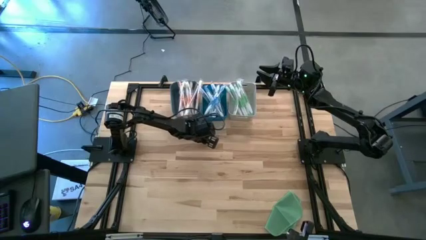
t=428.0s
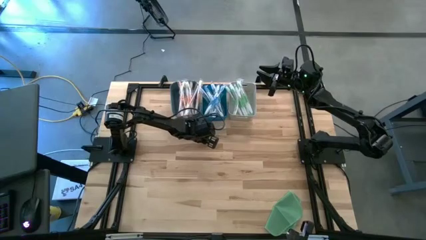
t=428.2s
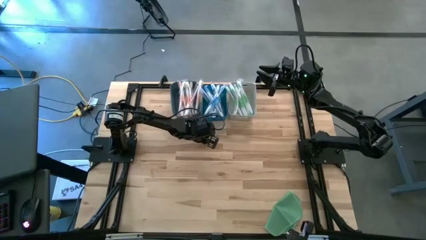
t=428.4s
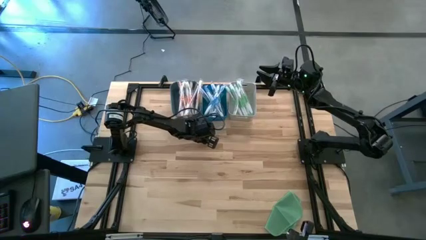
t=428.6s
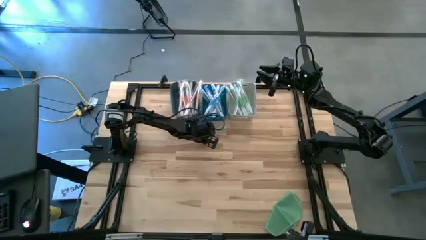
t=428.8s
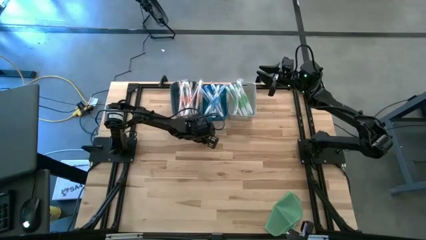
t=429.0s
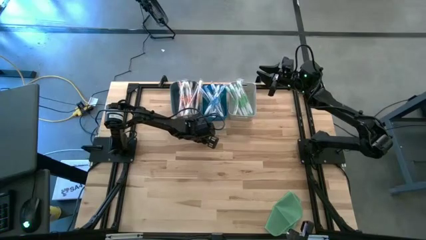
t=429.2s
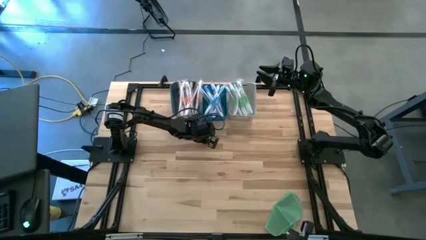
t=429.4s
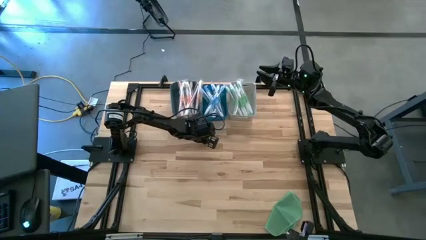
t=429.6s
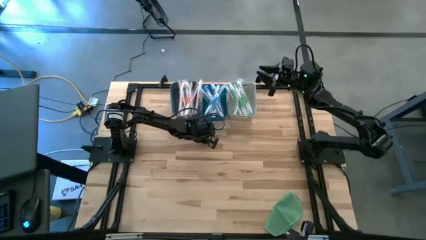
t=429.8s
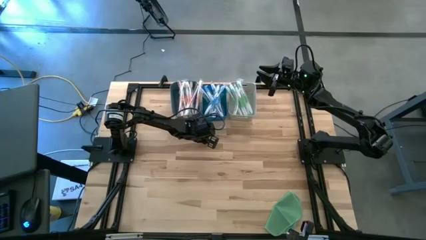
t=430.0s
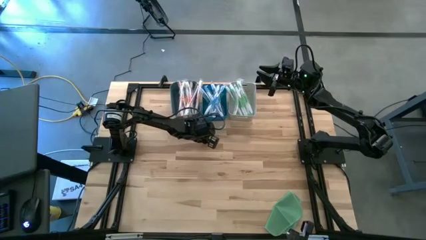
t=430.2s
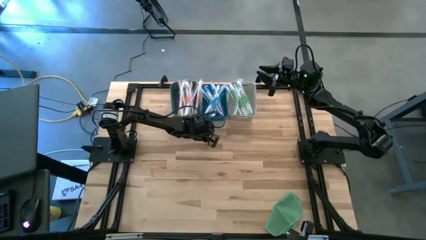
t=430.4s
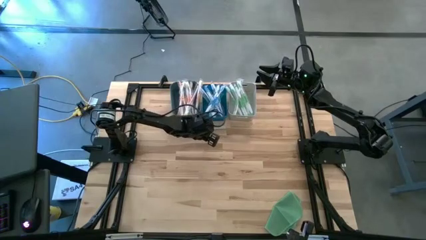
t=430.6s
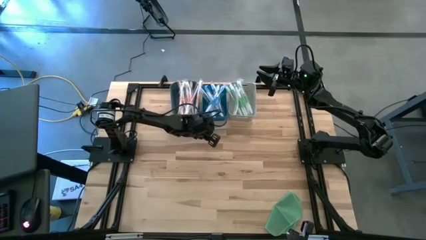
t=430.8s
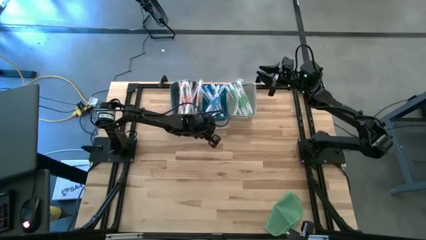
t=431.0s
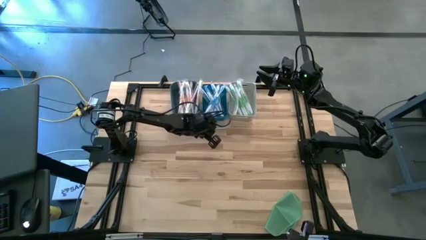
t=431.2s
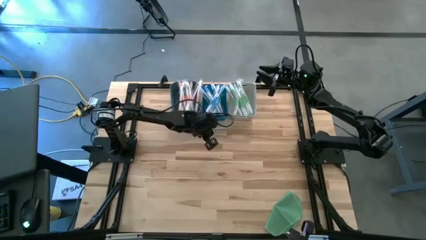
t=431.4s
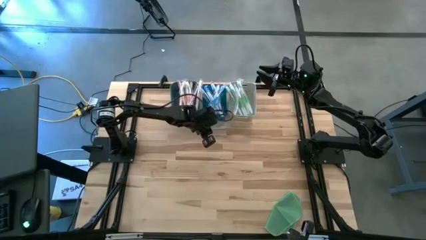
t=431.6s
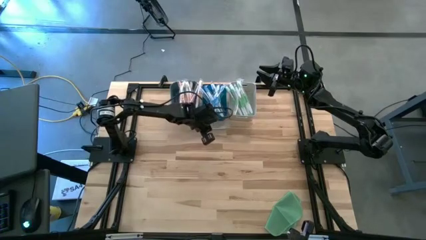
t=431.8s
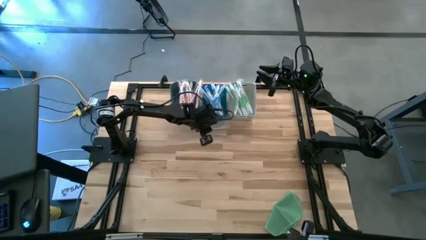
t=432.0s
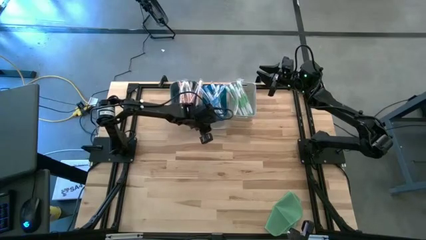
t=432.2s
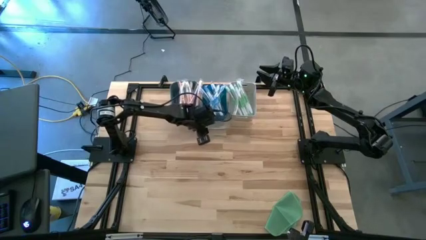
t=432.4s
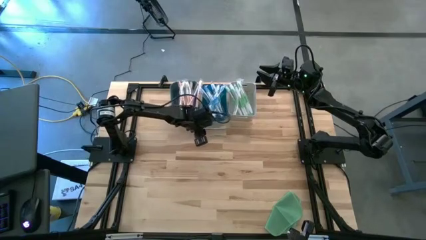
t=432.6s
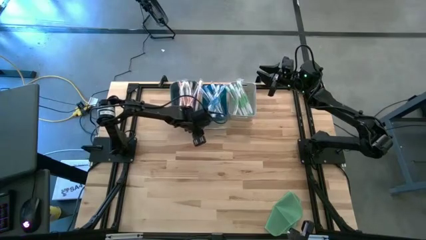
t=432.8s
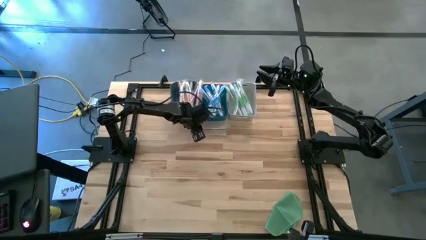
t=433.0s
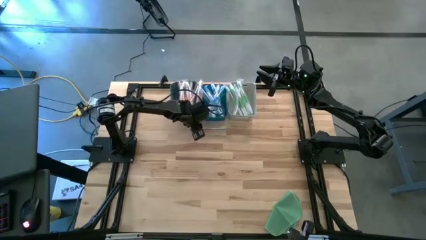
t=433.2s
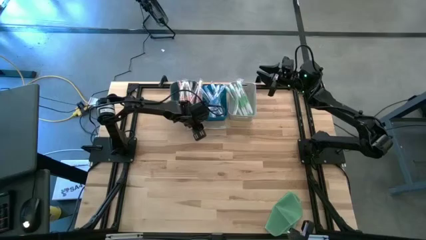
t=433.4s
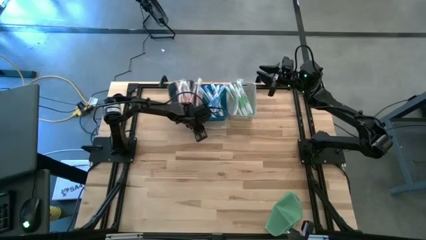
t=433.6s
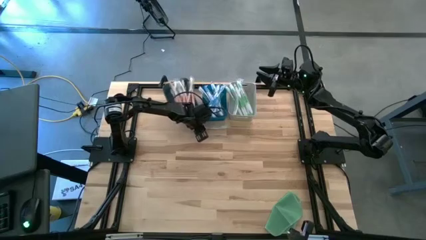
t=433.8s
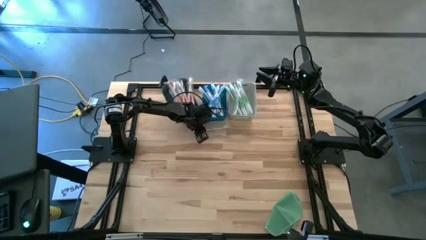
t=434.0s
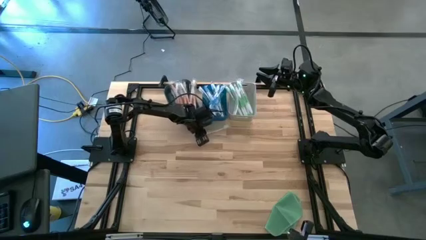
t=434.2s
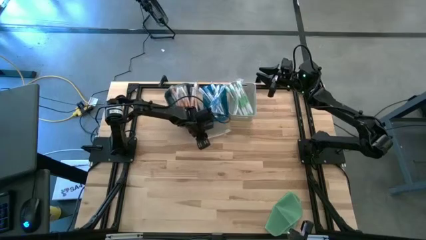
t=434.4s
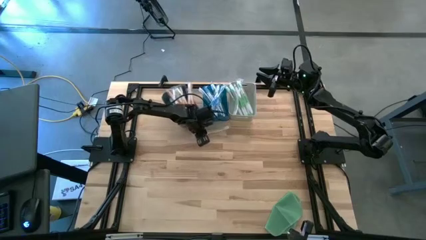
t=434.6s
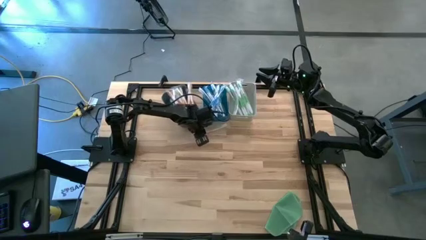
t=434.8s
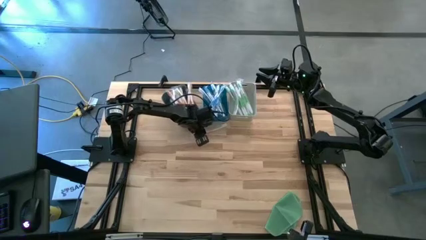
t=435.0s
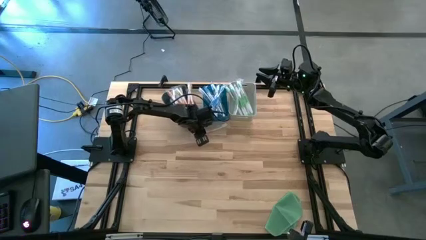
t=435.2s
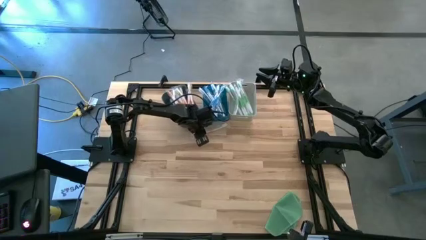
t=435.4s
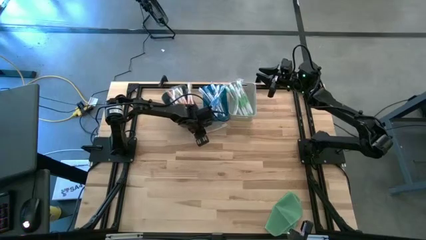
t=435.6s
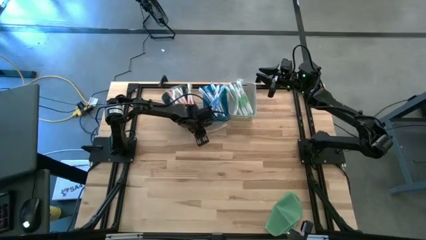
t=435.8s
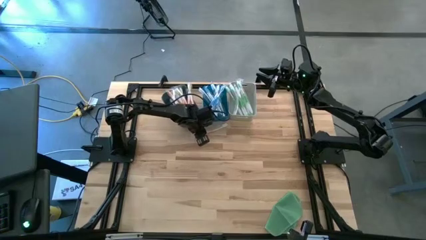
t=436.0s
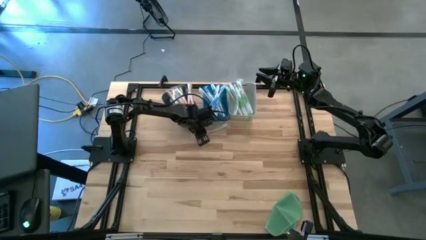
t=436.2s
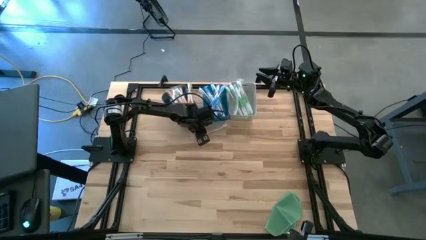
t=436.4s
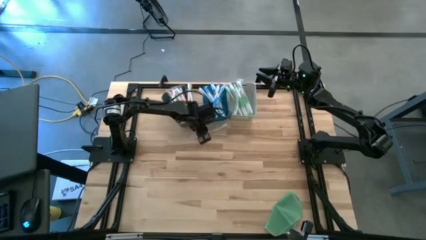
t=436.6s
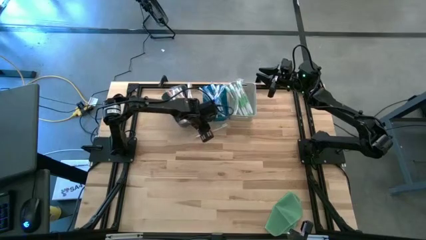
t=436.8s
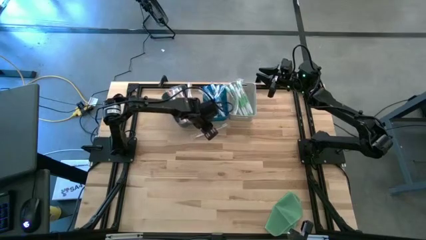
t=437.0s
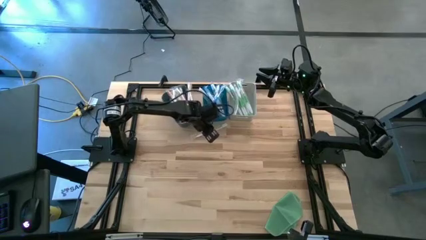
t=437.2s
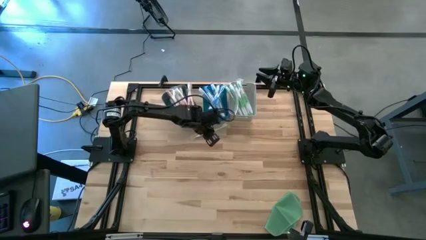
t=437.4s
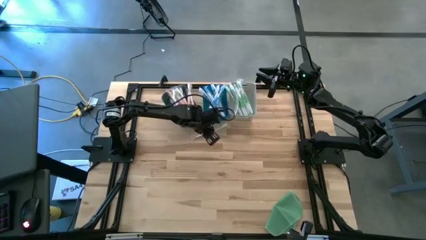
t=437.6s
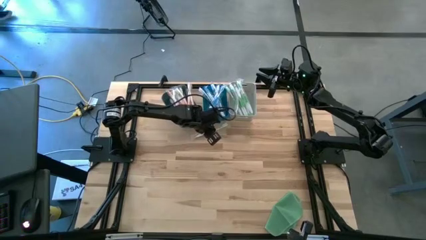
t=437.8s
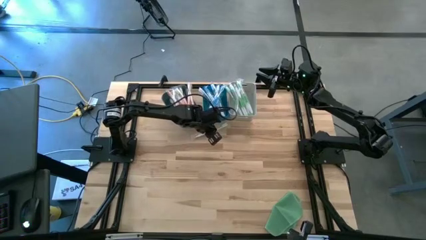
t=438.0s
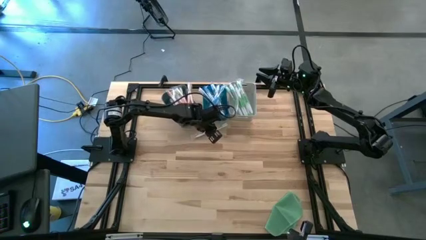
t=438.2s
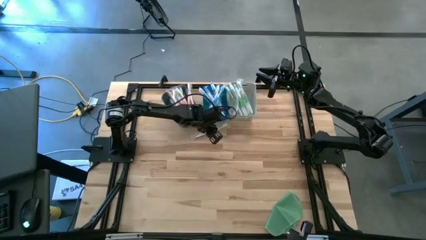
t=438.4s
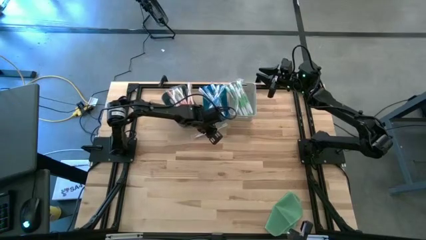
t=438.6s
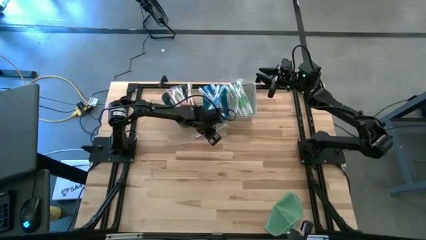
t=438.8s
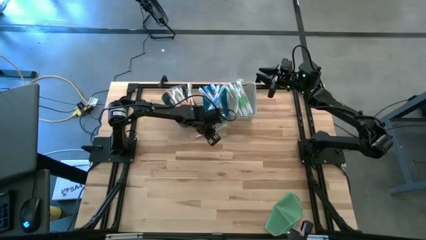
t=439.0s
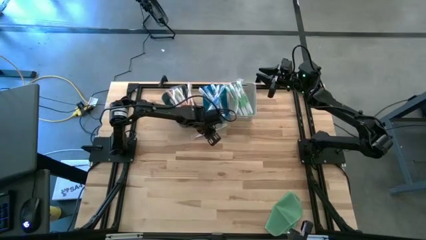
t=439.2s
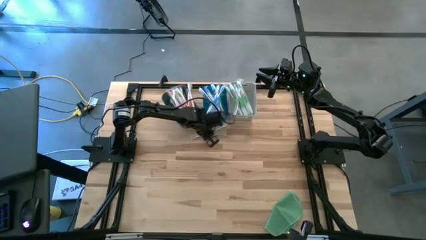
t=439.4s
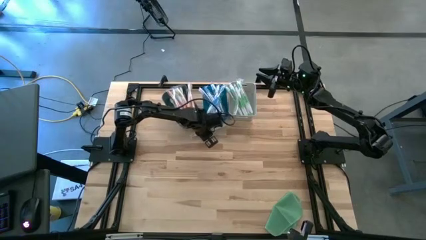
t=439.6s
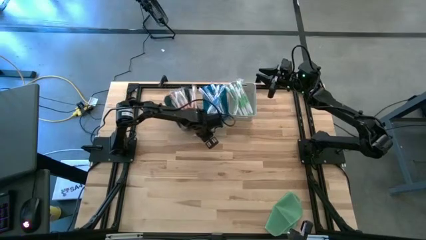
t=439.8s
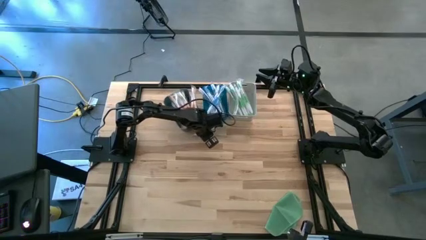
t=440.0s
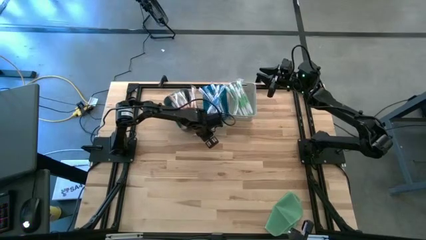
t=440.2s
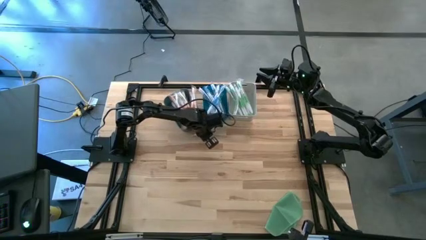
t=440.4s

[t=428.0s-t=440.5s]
Task: Pick & Place Toothbrushes
Put the orange toothbrush into the dark blue bin

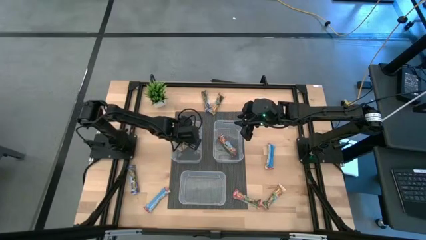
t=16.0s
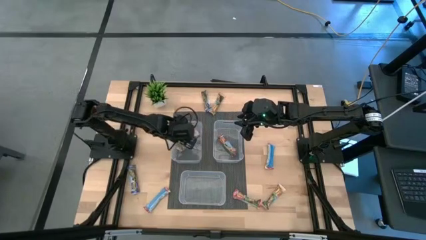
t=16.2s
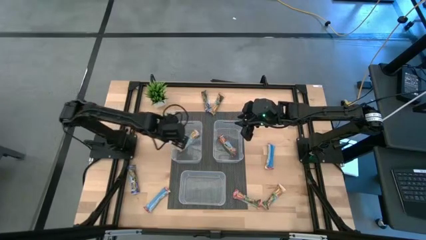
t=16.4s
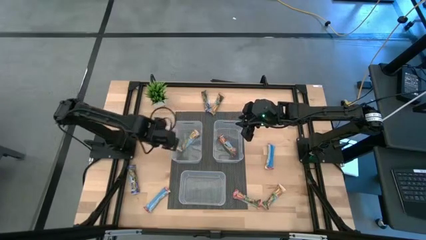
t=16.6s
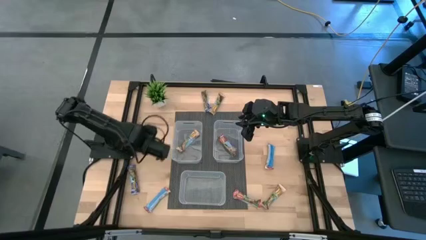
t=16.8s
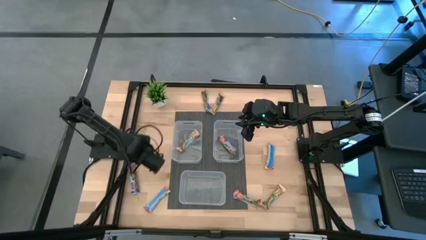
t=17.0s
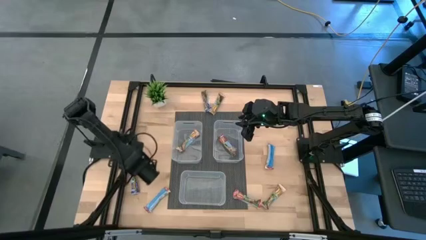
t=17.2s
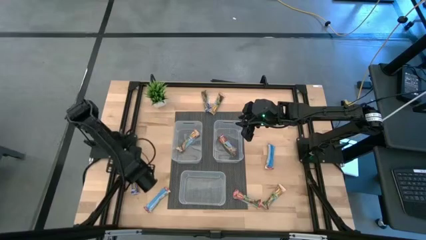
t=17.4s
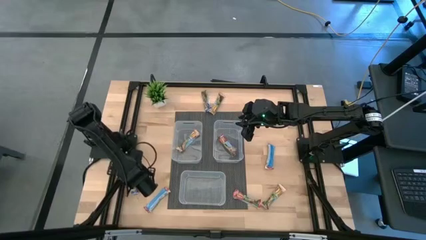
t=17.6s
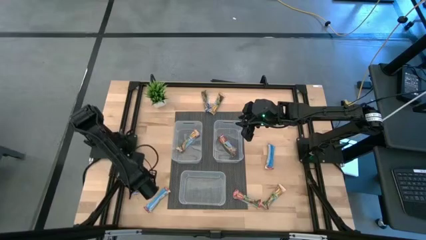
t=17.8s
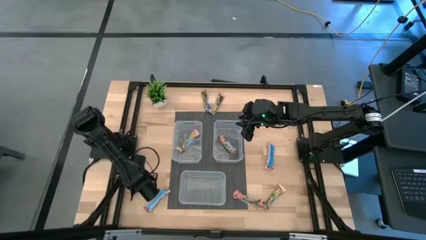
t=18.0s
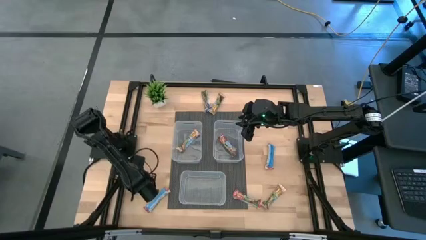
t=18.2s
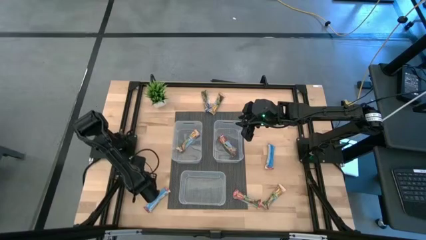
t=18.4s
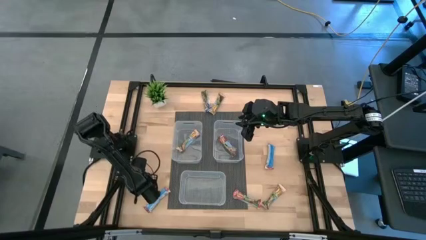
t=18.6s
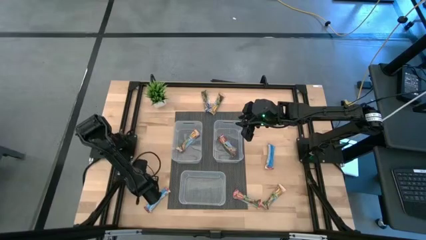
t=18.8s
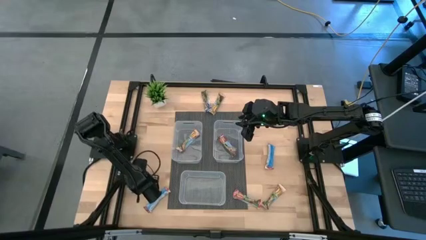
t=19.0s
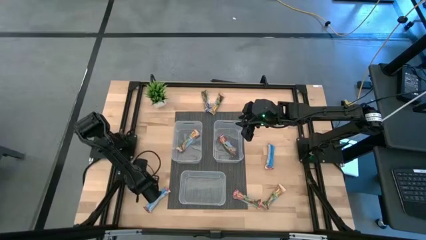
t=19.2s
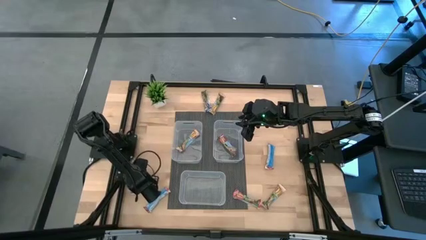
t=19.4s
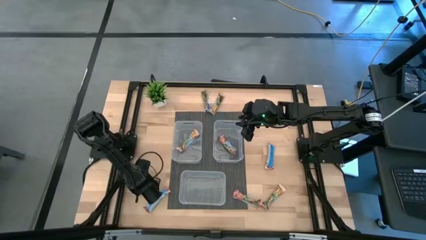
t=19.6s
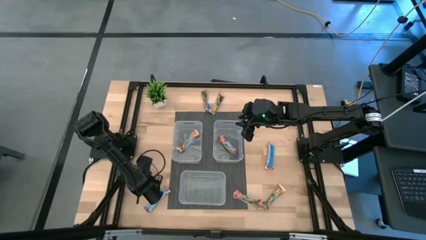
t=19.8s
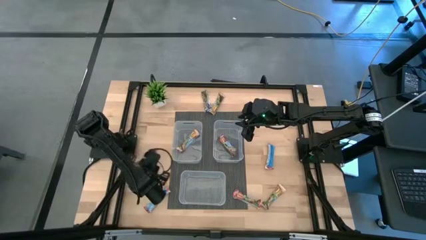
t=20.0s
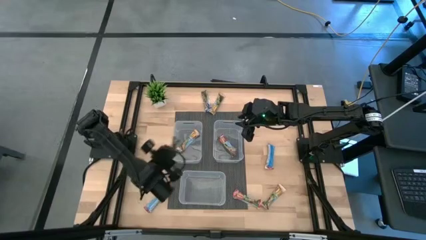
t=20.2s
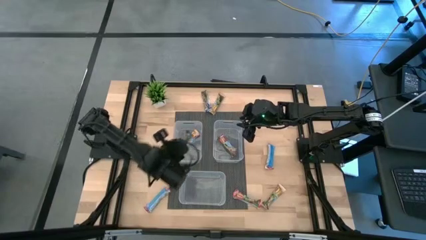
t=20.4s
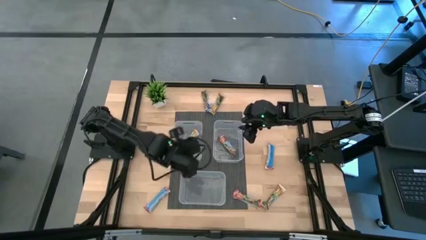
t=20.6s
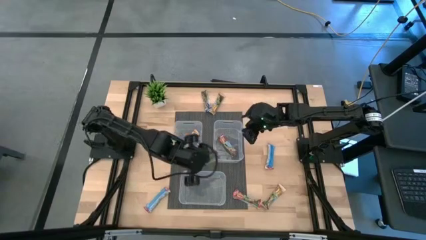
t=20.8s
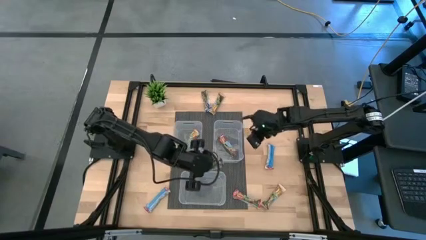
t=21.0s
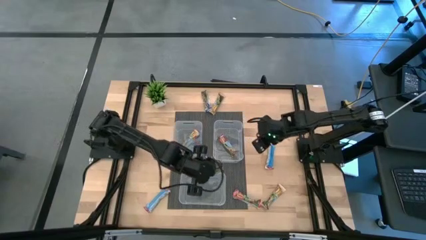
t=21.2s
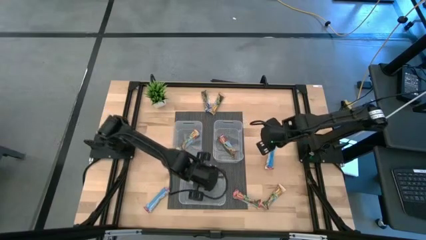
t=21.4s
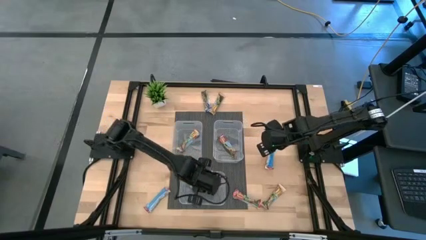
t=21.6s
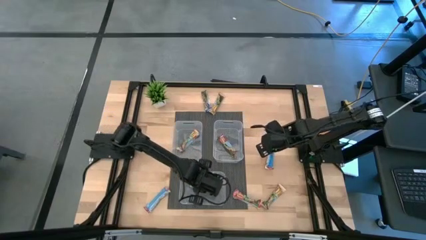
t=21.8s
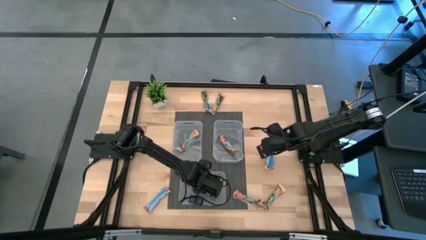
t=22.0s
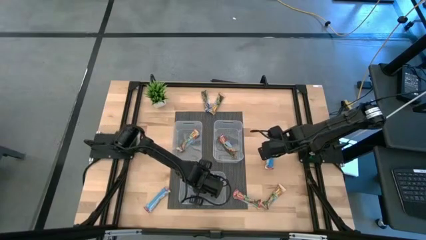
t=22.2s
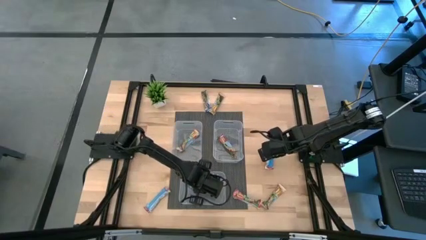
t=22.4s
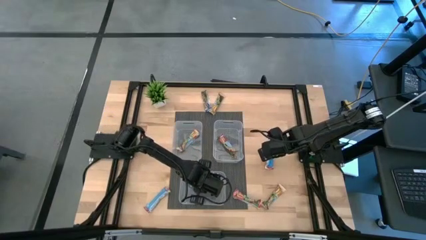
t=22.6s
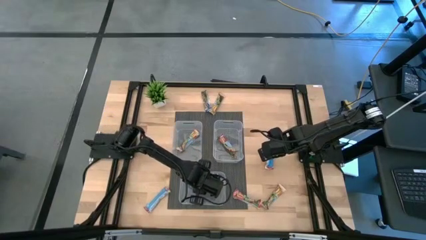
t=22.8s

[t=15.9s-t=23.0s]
Task: Pick and place Granola Bars by type
Put the bottom blue granola bar into the bottom transparent bin
